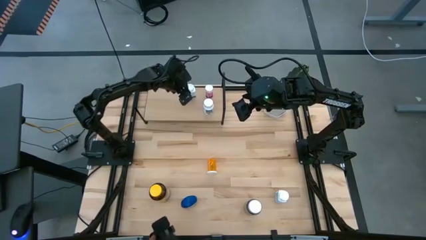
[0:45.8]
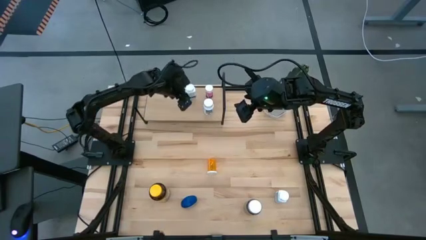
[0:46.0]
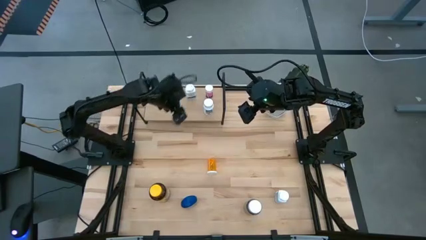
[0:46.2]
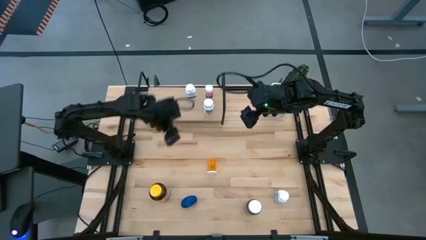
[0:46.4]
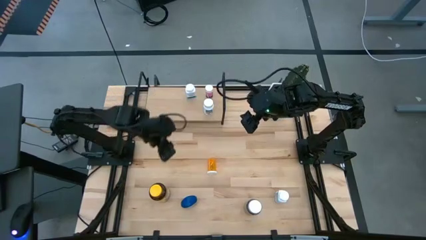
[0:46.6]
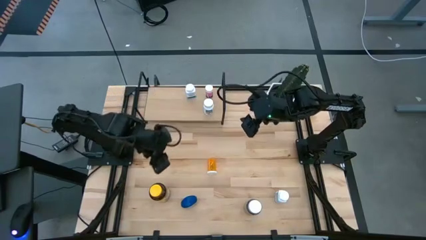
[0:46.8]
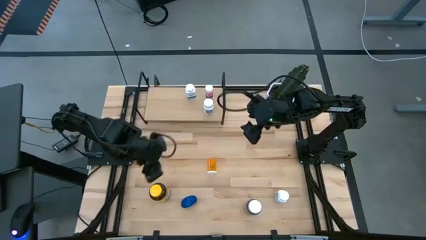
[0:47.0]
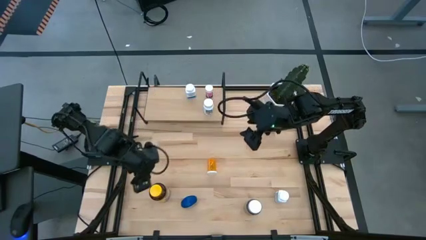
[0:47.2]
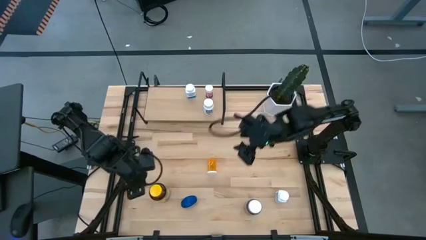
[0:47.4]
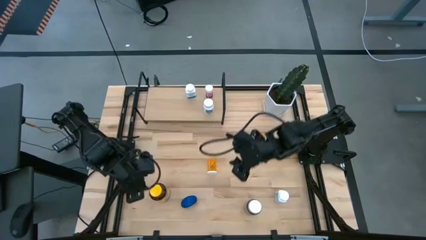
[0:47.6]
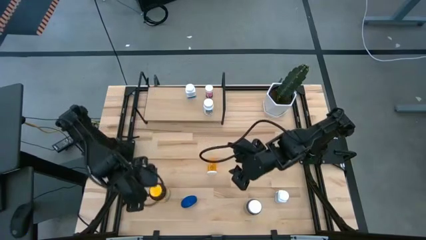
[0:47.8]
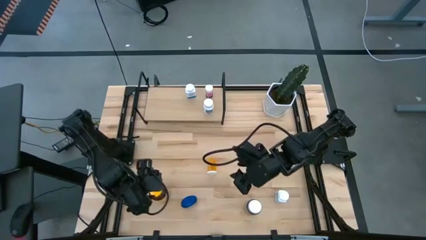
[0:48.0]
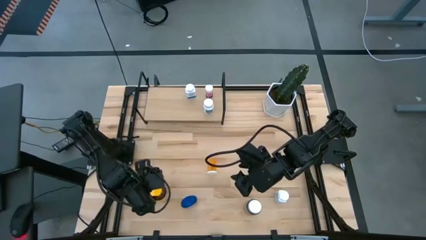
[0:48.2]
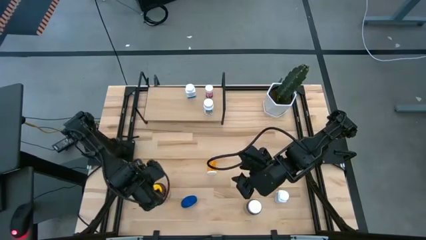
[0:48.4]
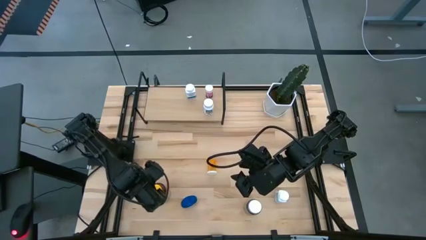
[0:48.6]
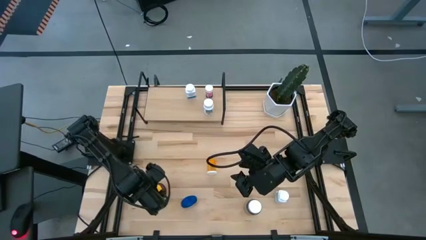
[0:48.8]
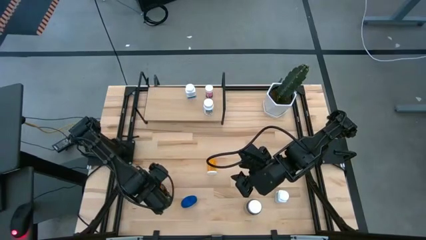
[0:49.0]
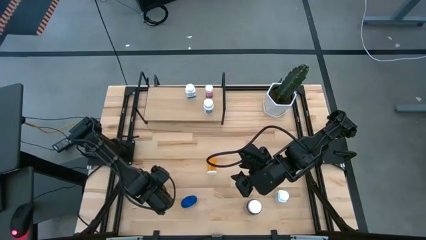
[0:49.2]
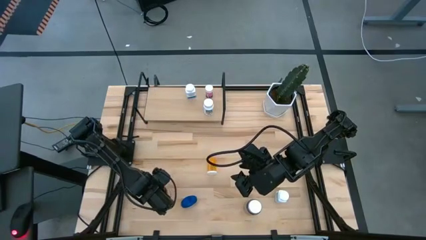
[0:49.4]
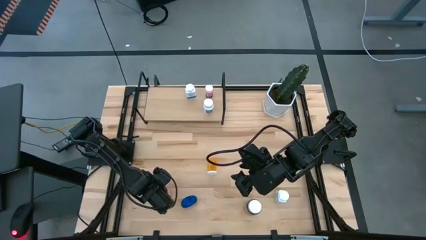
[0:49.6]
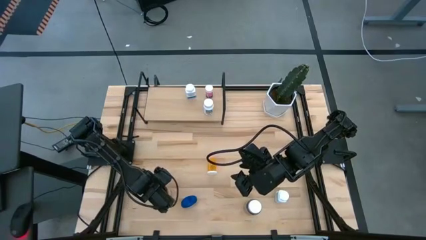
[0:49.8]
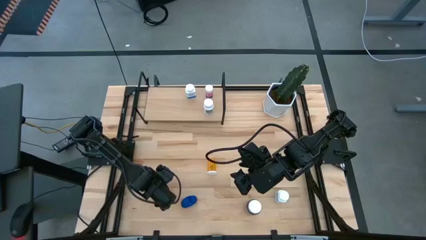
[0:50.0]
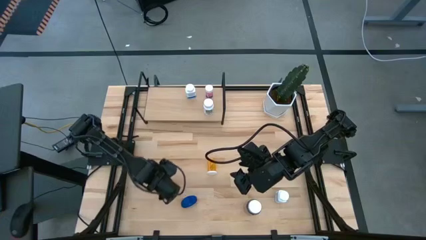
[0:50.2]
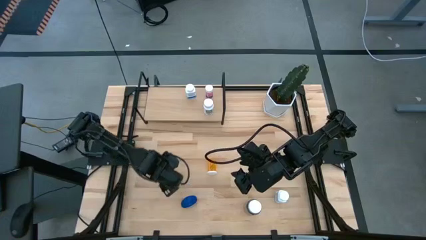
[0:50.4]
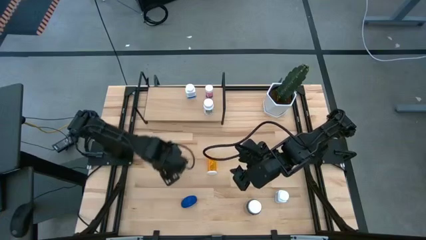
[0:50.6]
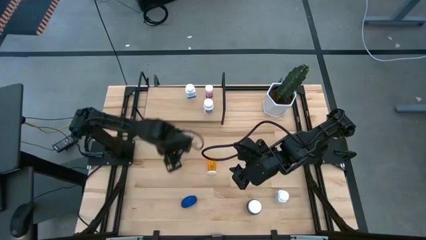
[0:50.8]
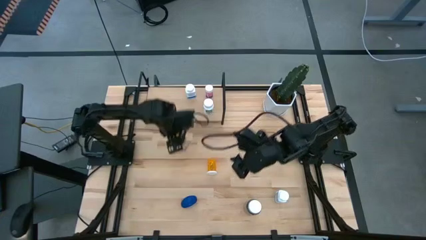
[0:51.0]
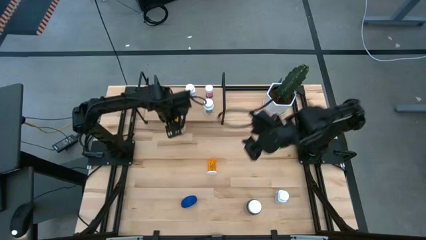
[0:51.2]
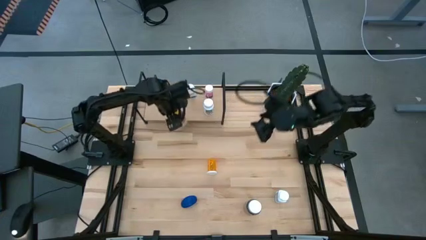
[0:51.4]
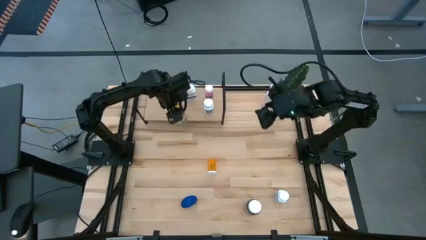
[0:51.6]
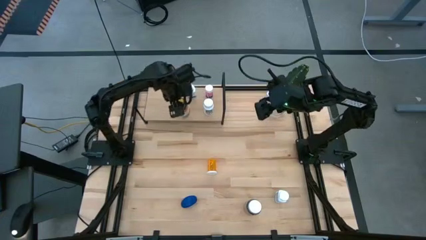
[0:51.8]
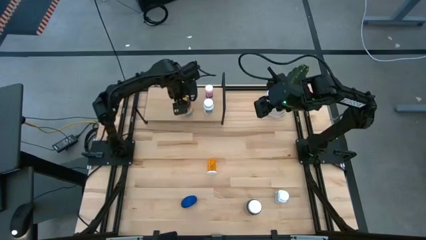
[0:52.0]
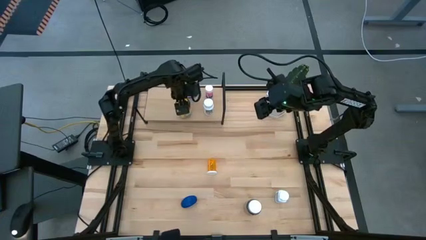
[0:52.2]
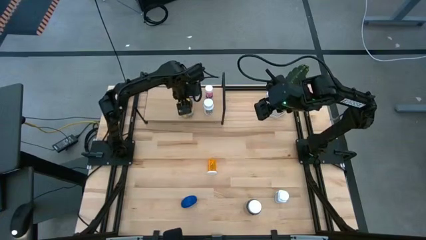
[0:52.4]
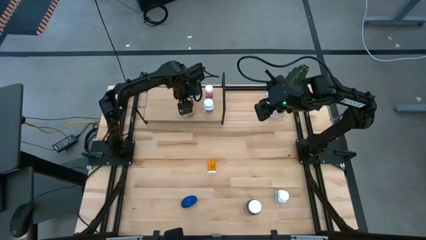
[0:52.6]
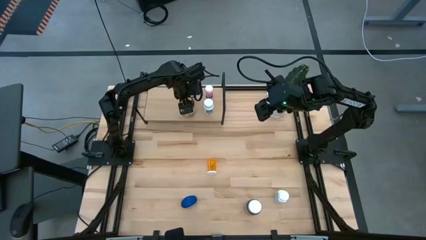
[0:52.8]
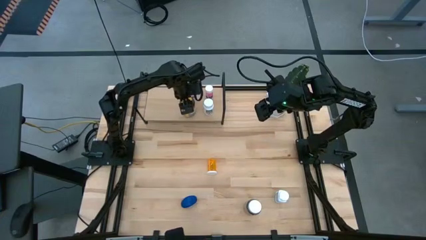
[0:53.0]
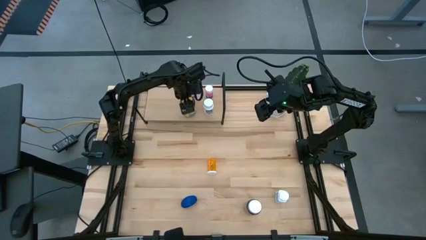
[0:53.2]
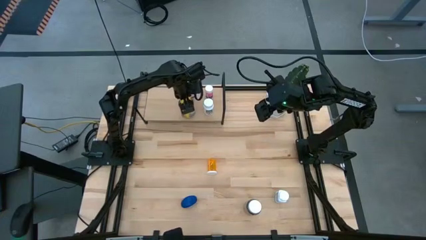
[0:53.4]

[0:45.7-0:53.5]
Task: Pick and place medicine bottles onto shelf by color
Put the yellow pill bottle on the shelf

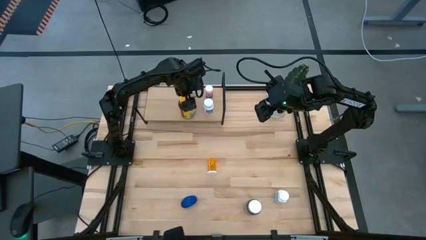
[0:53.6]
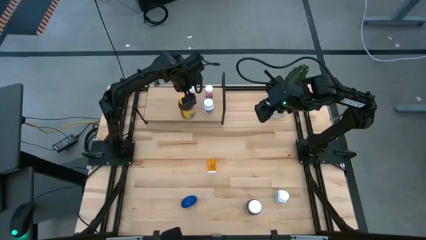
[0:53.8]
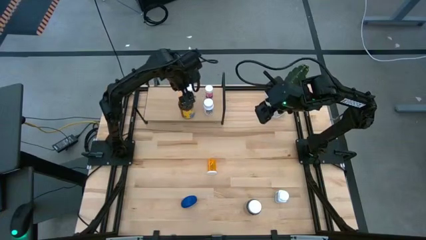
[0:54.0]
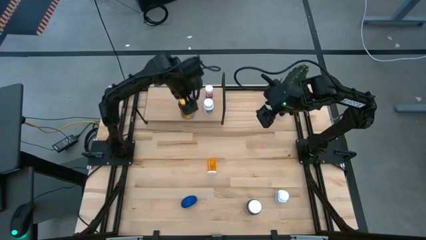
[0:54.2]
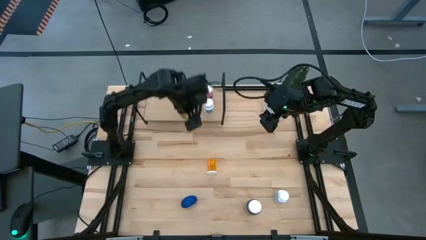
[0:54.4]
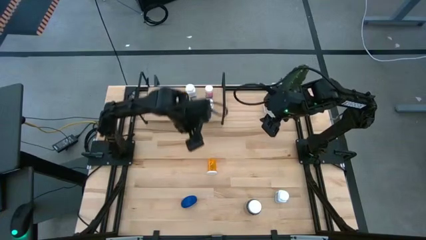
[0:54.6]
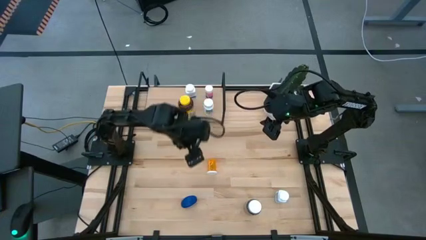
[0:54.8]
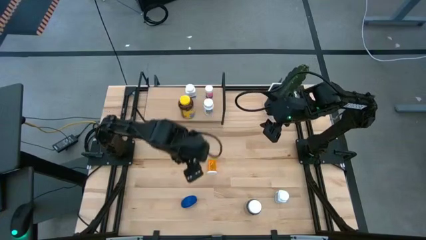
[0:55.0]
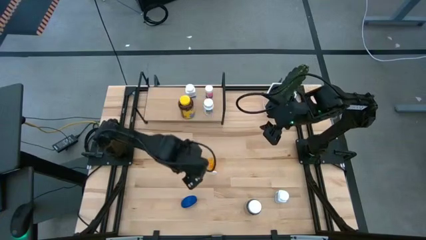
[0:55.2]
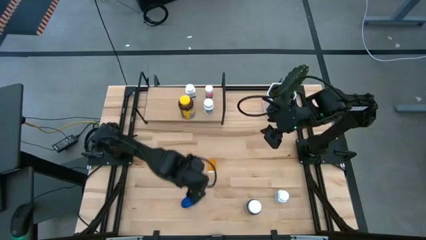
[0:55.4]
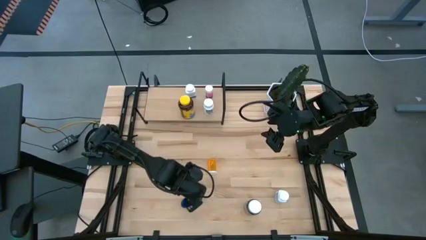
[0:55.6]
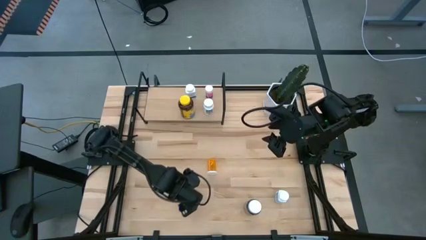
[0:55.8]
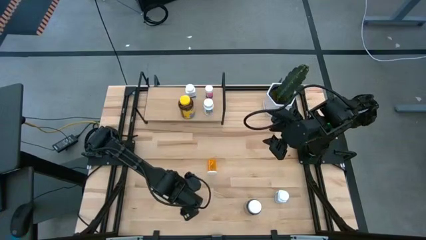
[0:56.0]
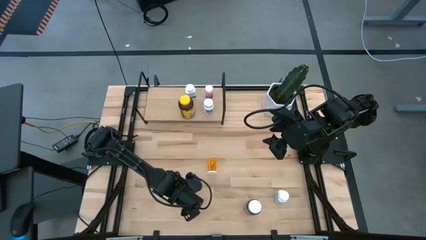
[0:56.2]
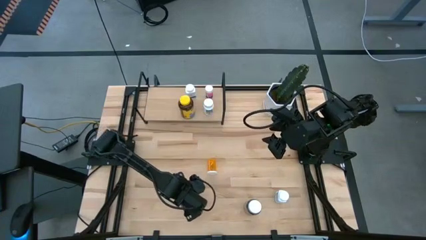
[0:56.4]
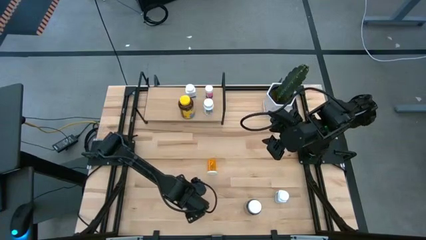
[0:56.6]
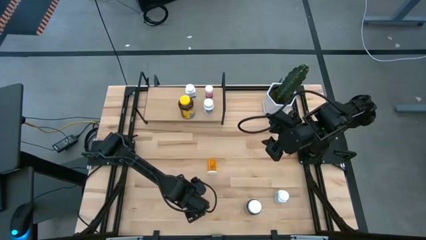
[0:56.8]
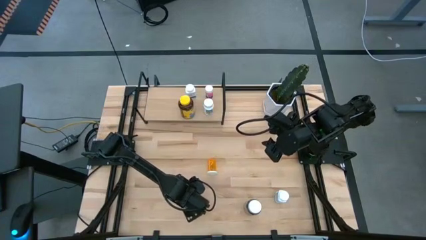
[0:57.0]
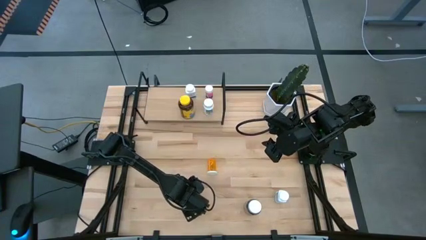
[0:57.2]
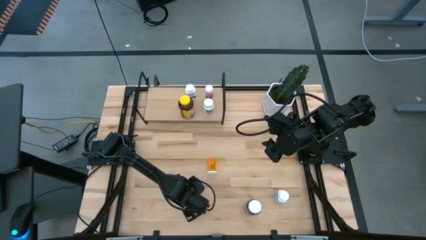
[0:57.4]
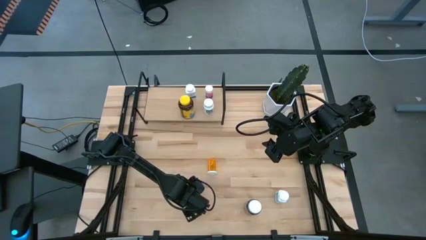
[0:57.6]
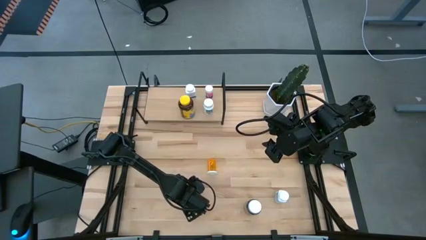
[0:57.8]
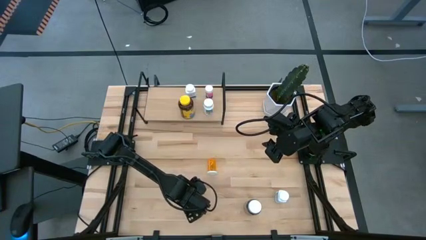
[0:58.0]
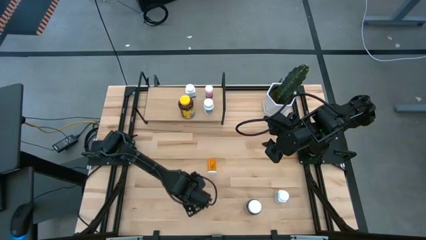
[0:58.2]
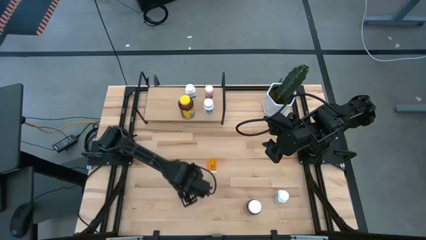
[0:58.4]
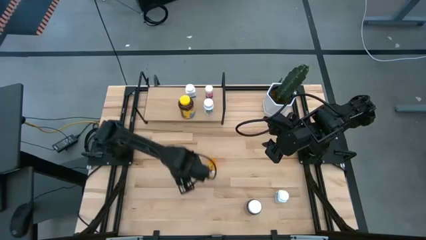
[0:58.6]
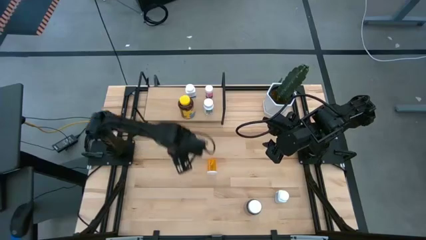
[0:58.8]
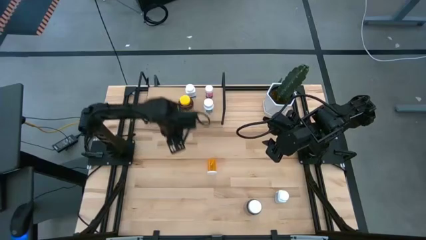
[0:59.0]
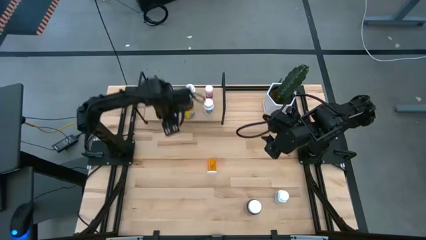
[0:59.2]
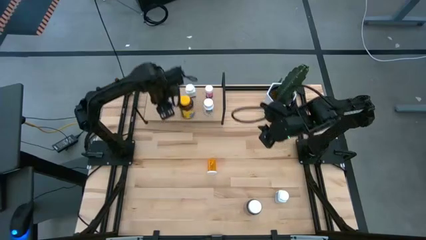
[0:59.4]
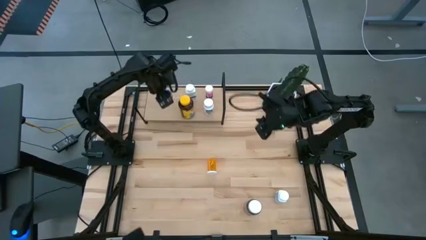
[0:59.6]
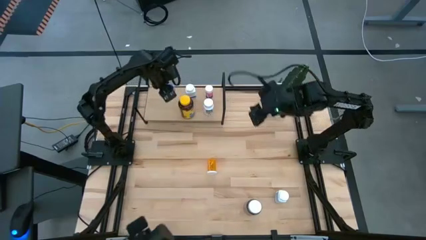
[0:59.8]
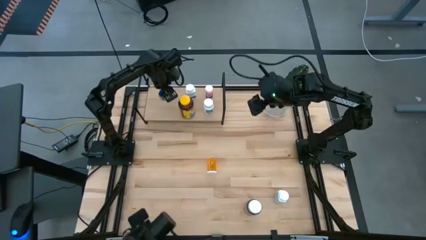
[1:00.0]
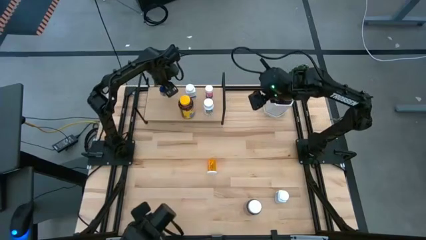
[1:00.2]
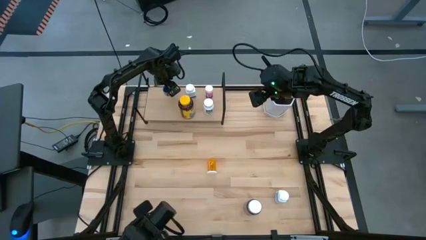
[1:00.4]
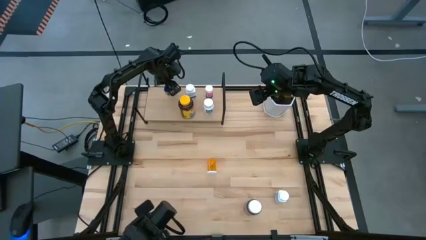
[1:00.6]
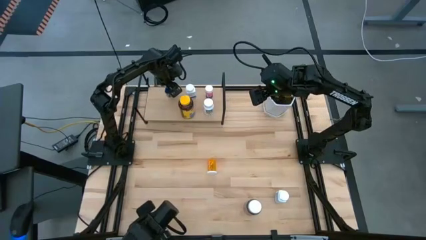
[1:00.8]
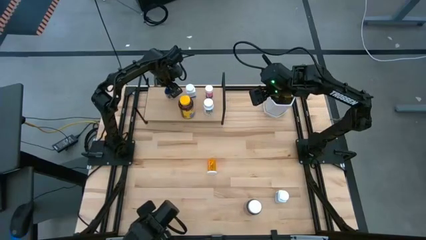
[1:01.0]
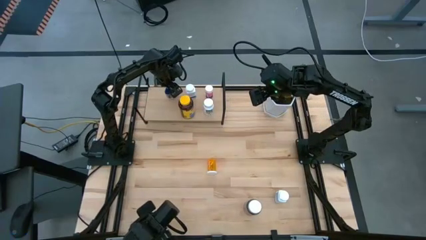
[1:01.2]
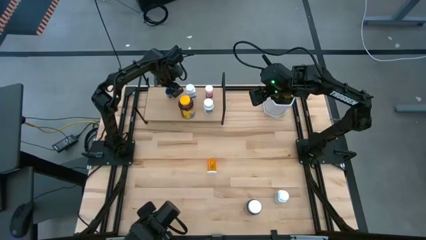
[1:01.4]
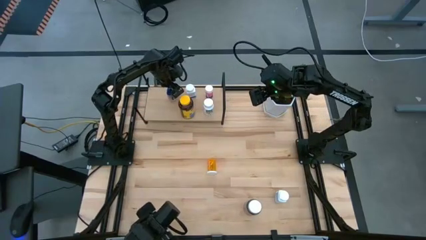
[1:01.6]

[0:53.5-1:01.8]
Put the blue pill bottle on the shelf
